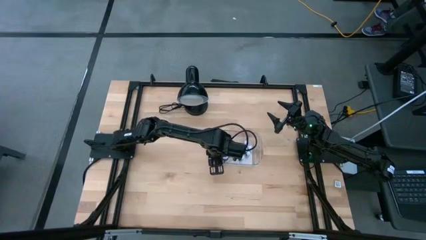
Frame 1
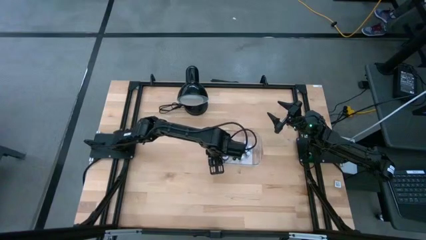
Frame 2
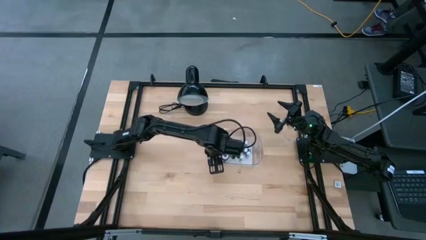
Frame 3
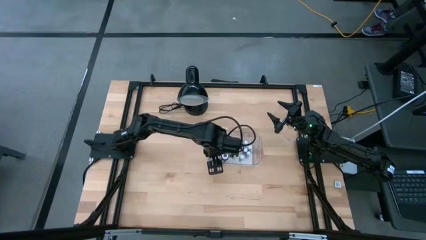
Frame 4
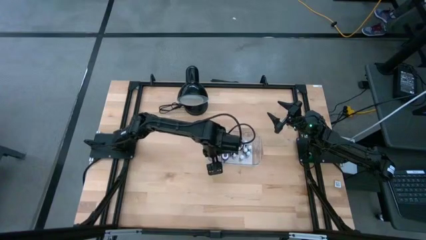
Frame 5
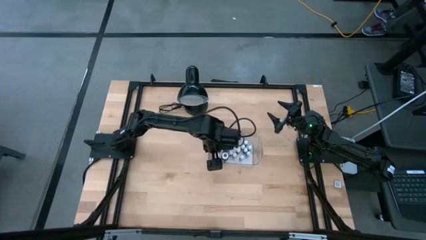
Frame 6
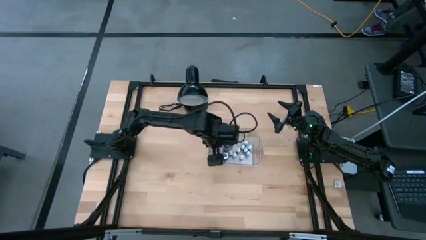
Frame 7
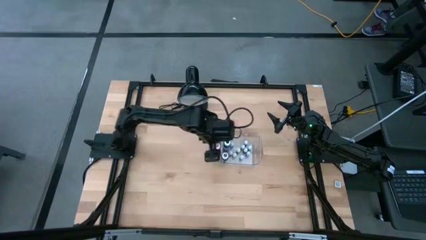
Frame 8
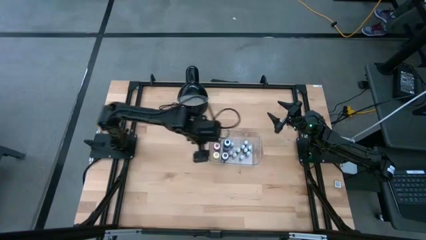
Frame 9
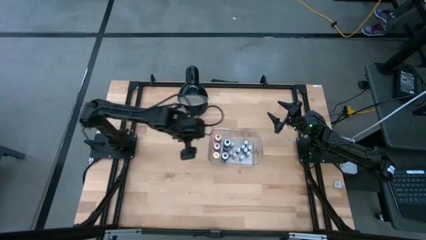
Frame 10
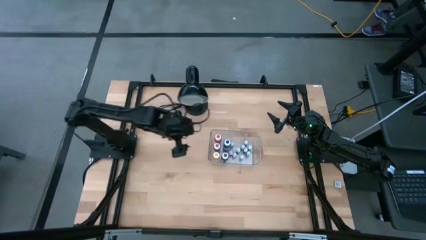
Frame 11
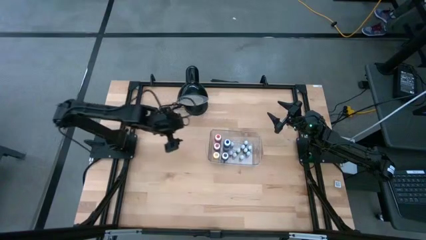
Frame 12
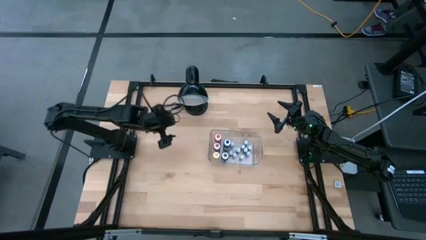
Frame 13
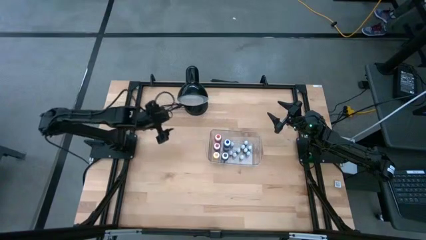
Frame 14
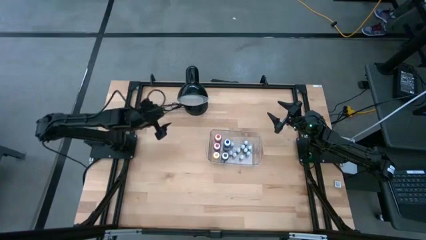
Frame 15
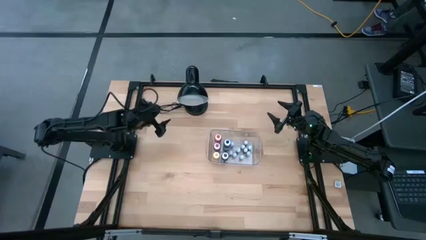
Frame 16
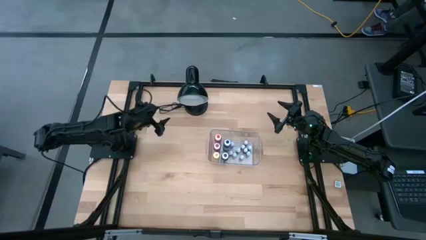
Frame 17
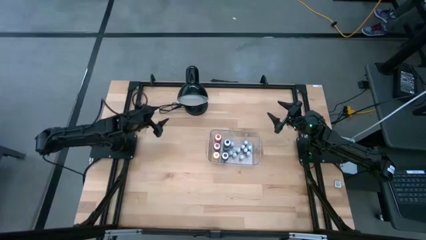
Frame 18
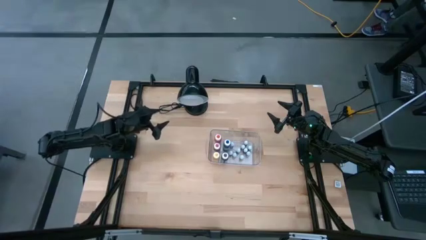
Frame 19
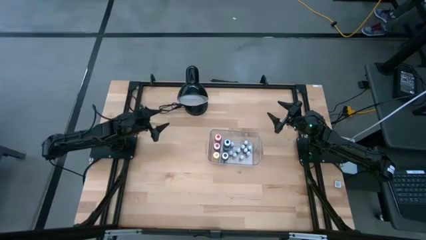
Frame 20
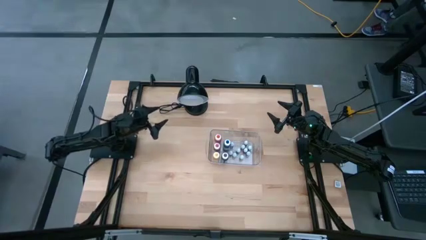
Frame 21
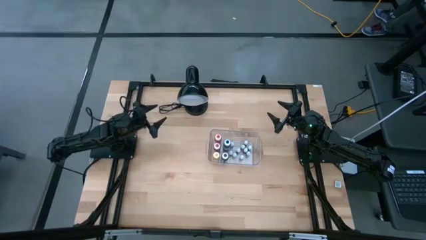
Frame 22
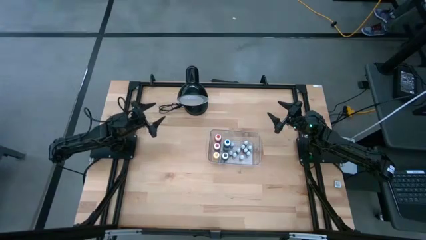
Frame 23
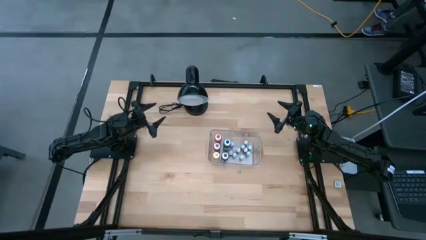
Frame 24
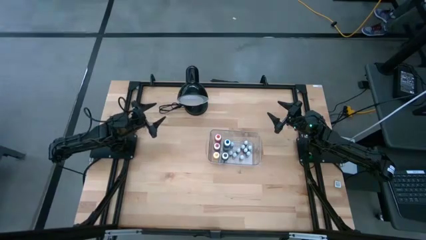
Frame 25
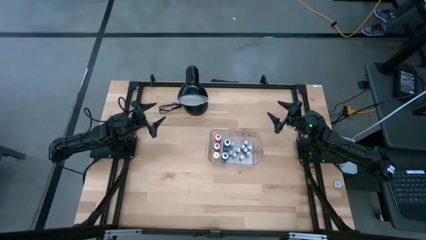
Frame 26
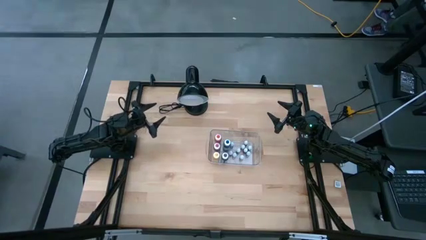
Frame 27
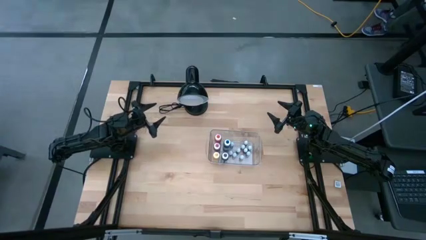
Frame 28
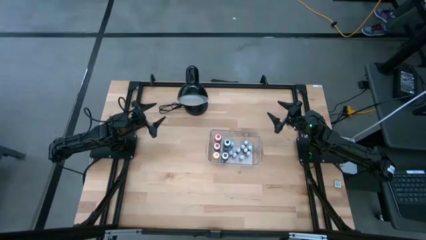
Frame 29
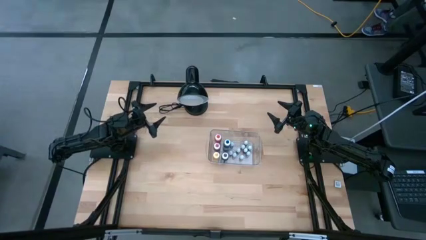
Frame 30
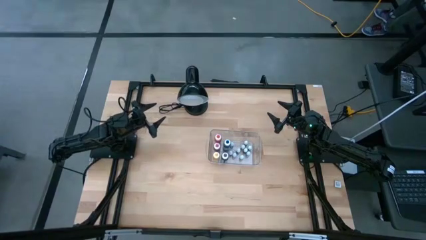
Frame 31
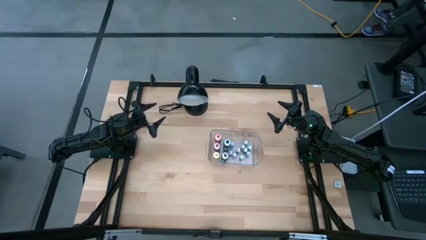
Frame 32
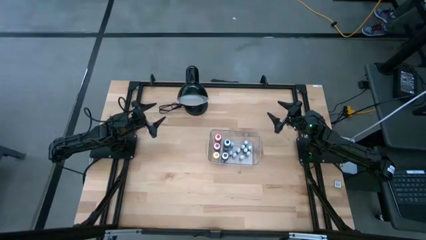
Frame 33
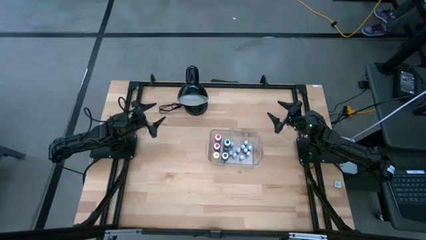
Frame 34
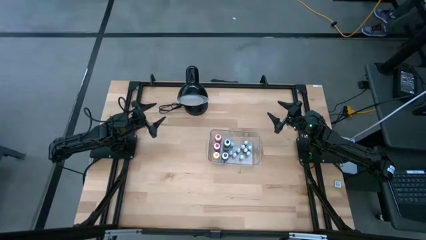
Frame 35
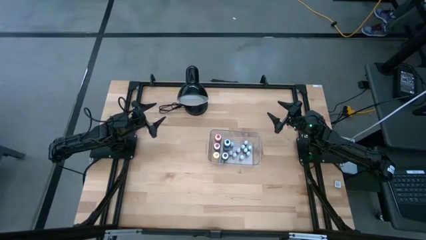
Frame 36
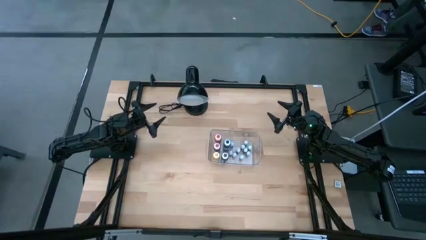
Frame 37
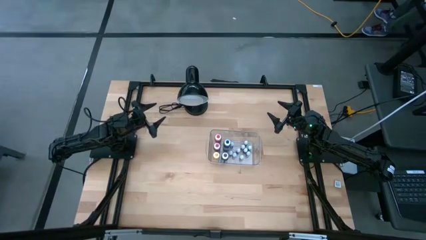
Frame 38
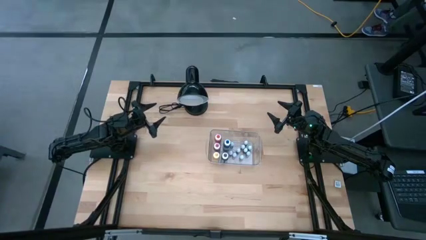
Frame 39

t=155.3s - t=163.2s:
Task: Pick & Place food coloring
Return to Home Position

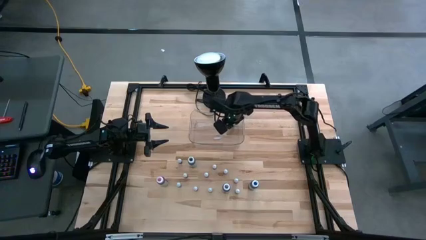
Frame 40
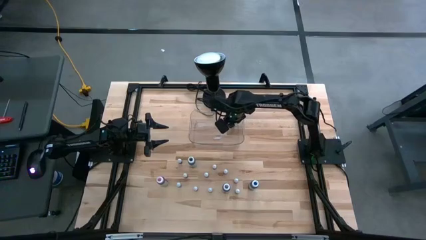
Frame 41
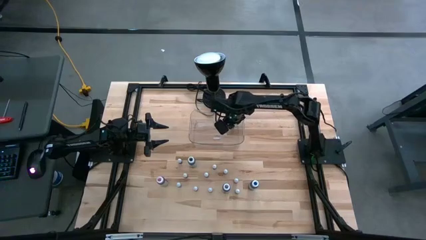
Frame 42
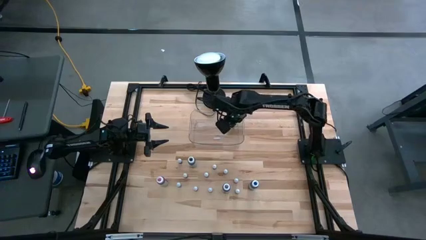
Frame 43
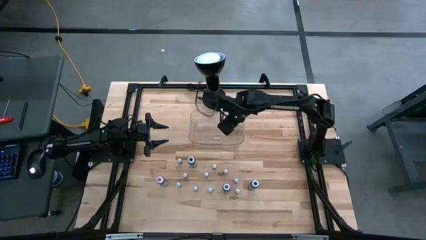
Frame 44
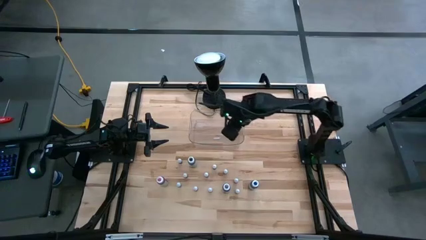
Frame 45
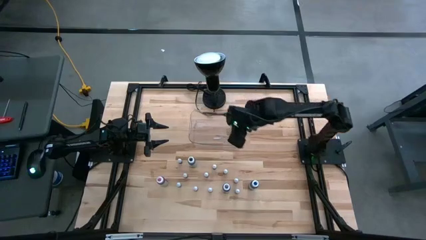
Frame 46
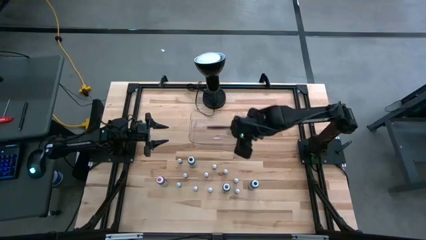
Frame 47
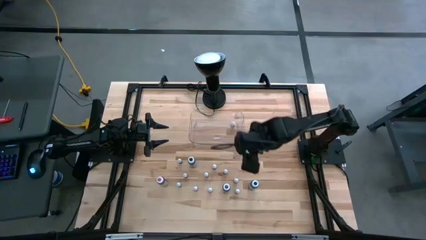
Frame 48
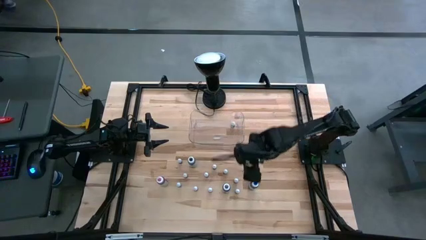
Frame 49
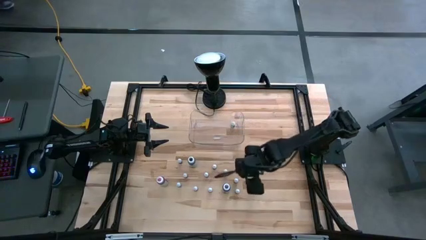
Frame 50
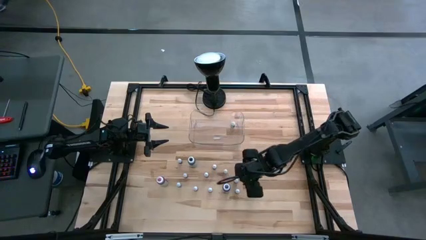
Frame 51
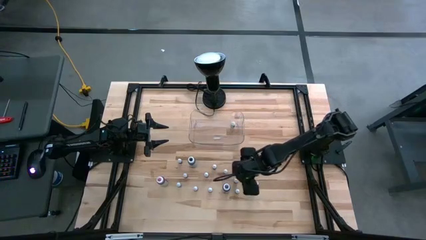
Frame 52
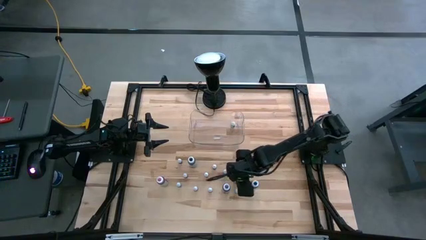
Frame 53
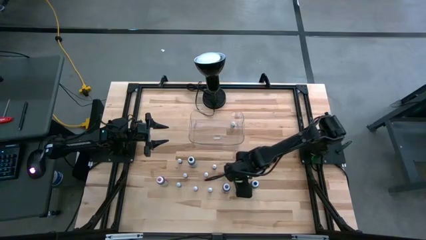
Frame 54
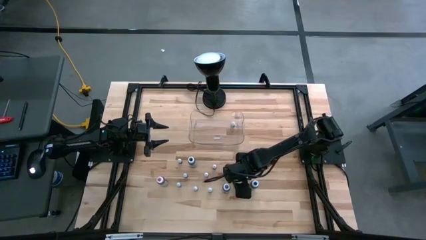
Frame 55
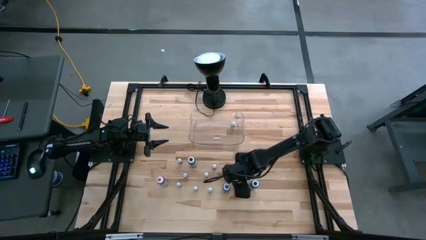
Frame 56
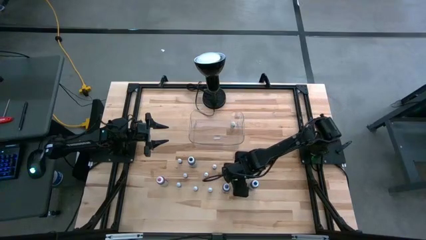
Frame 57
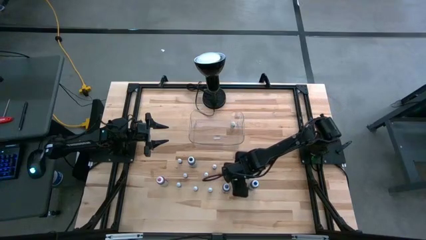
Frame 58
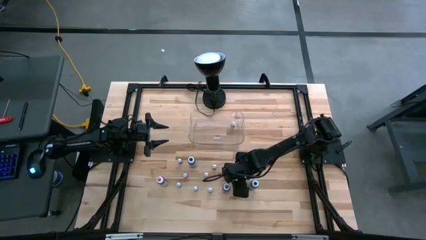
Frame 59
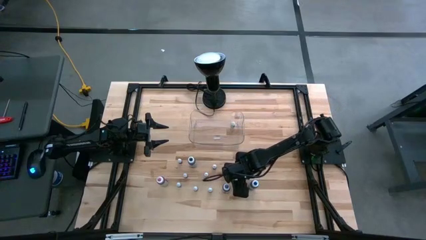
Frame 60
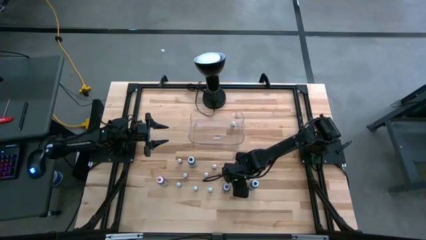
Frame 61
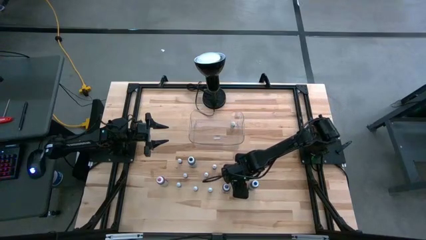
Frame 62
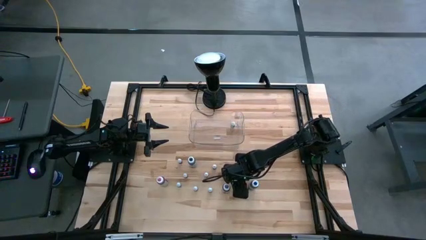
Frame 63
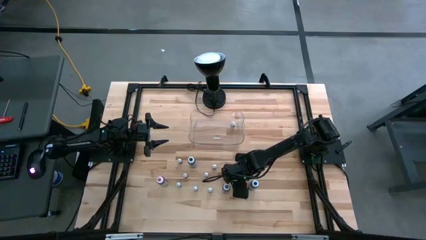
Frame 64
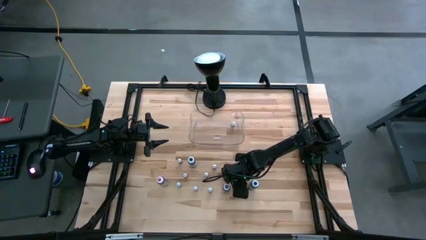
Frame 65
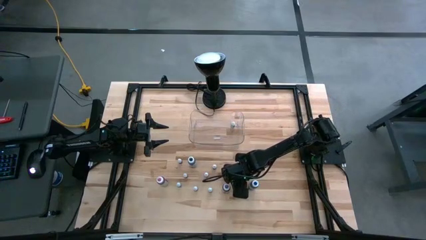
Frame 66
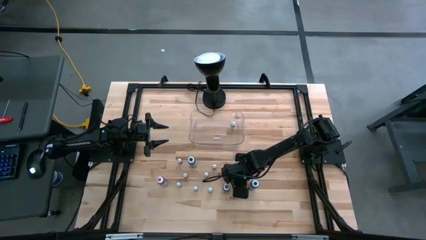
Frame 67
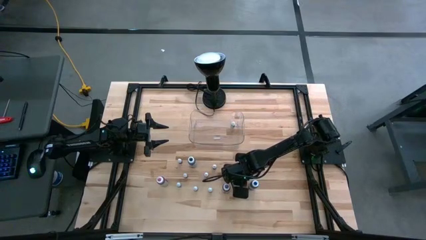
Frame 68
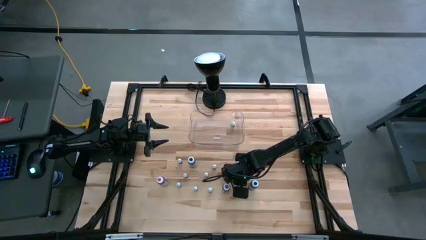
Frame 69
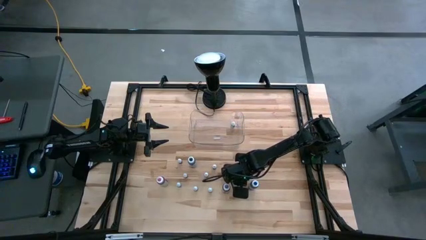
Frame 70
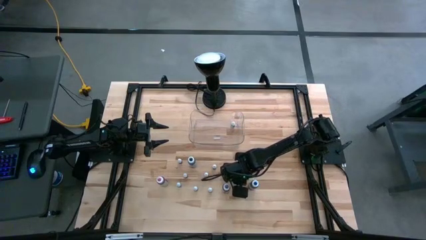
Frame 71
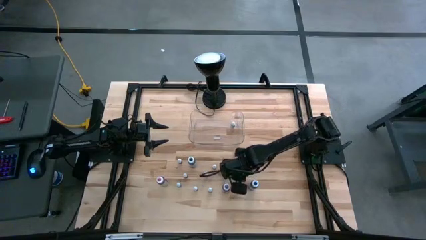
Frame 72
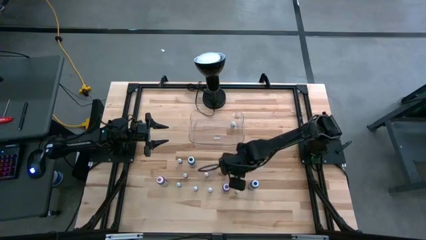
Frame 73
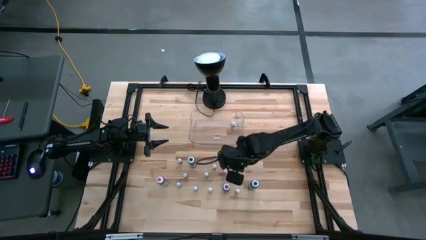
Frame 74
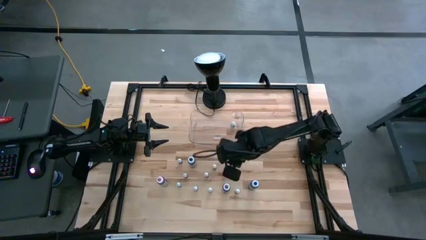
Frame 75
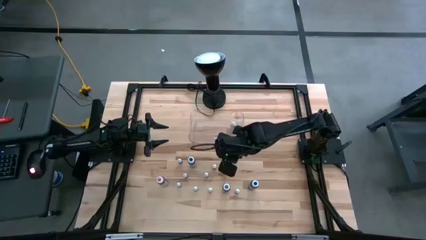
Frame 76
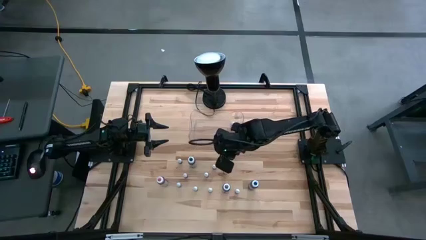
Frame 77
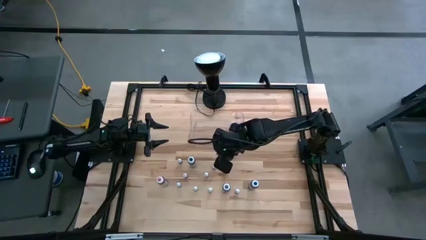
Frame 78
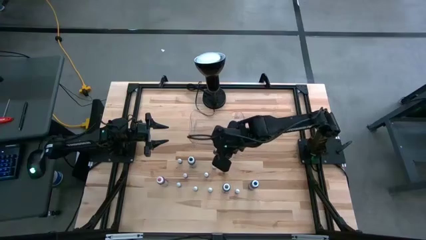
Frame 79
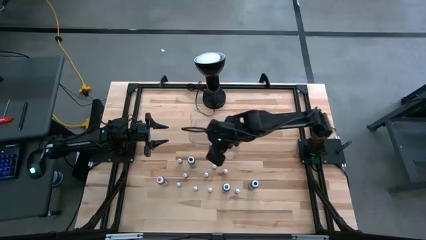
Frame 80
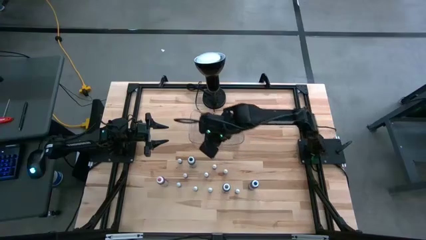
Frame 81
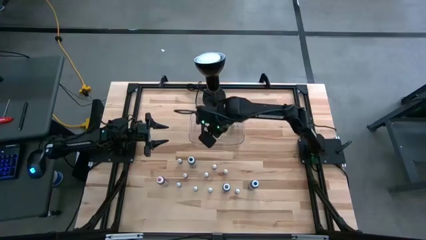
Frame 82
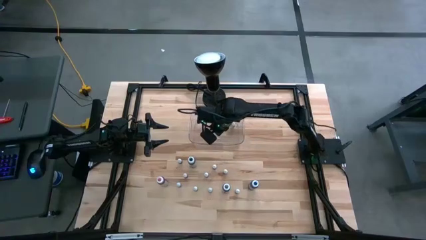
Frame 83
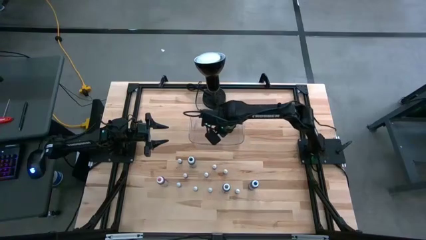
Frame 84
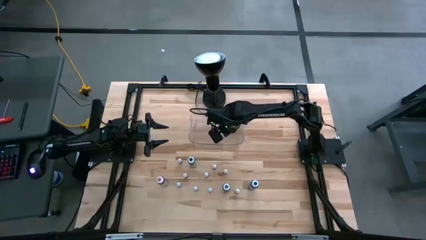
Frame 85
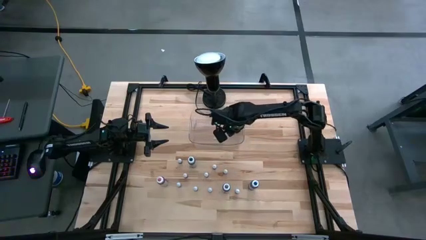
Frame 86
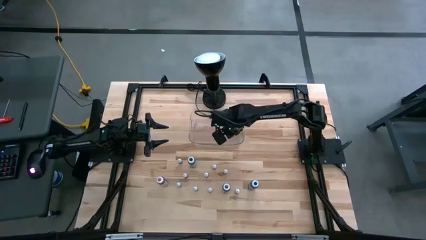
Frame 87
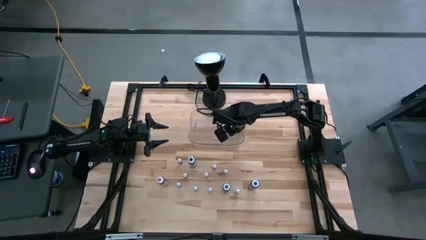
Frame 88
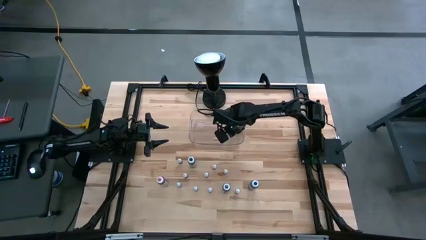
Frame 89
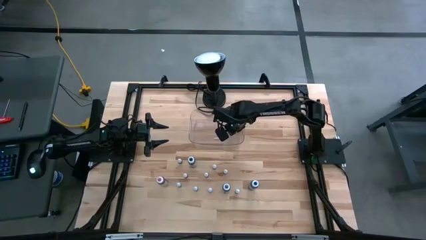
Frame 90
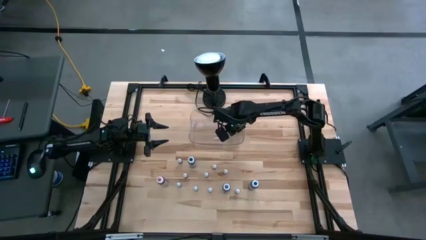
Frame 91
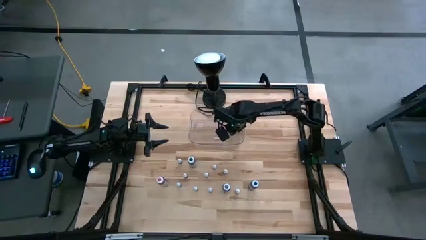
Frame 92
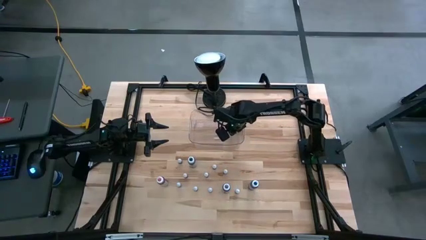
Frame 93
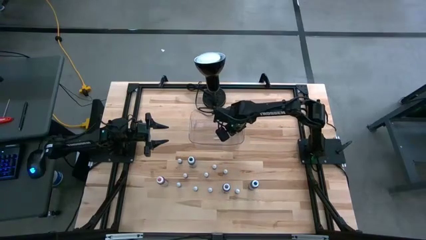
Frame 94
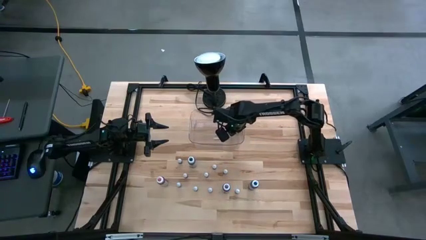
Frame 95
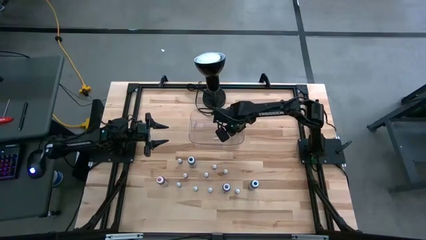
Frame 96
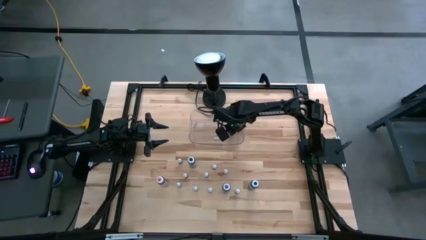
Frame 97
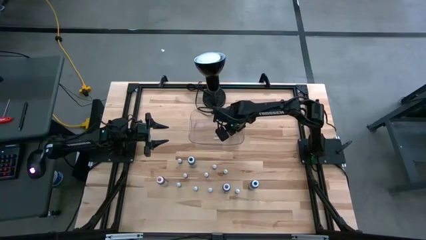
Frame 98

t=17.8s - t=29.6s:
Task: Pick & Place food coloring
Put the red food coloring bottle into the transparent bin
